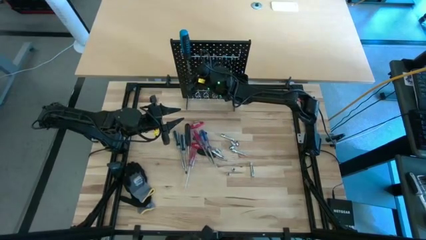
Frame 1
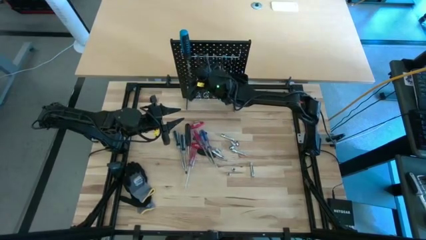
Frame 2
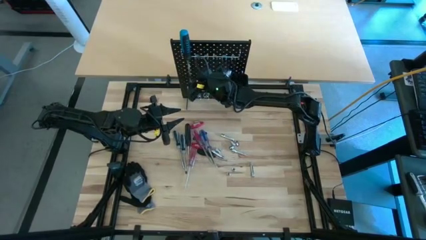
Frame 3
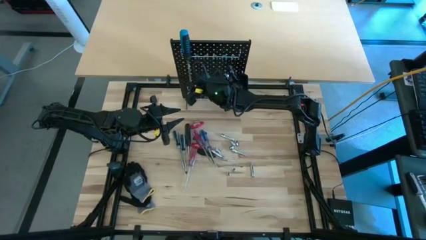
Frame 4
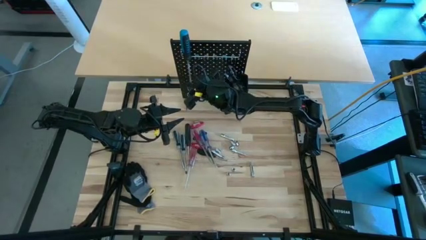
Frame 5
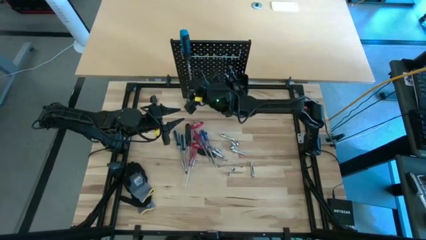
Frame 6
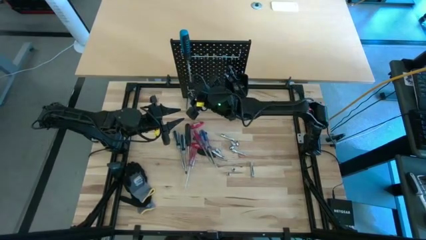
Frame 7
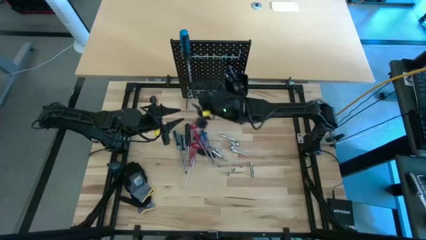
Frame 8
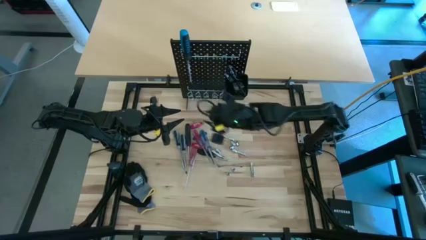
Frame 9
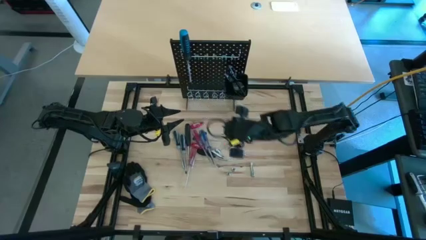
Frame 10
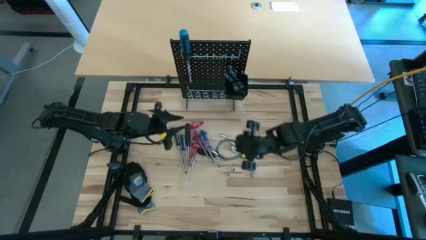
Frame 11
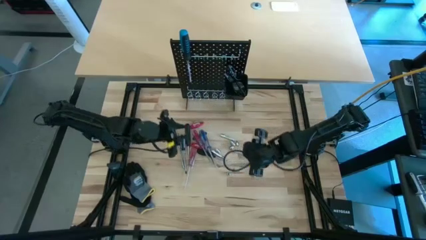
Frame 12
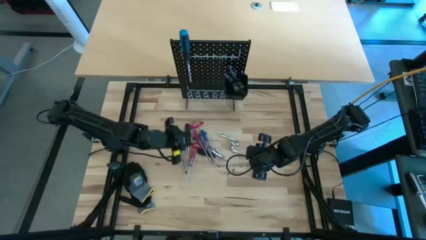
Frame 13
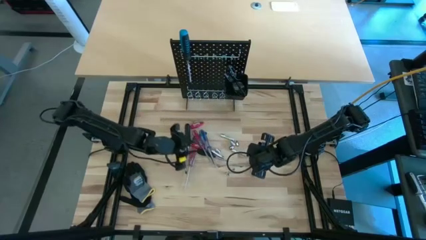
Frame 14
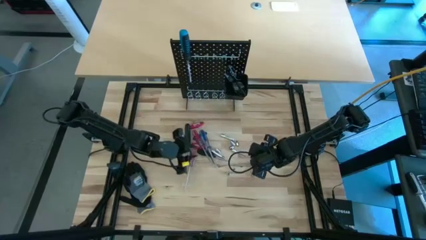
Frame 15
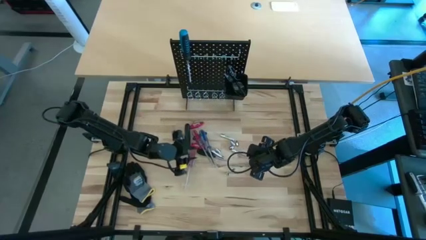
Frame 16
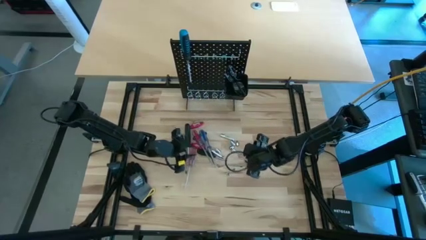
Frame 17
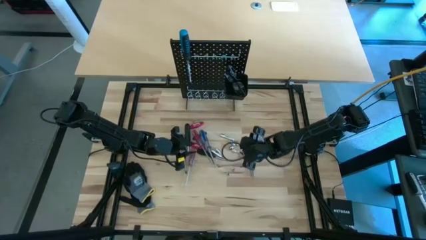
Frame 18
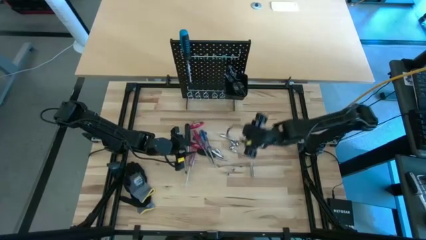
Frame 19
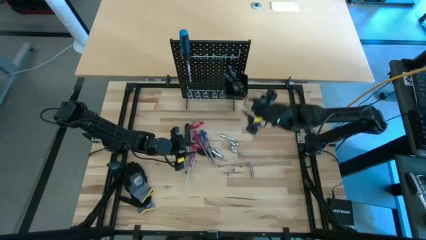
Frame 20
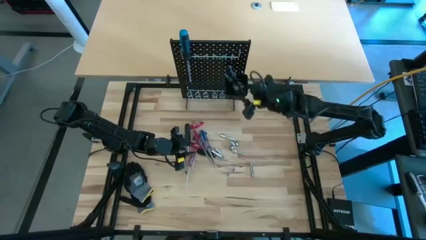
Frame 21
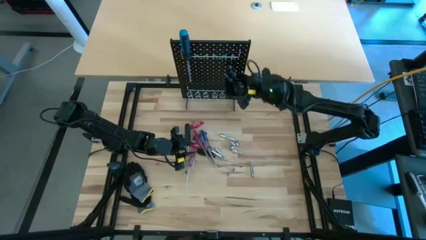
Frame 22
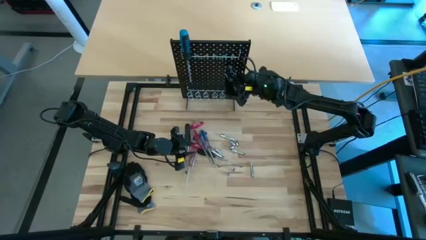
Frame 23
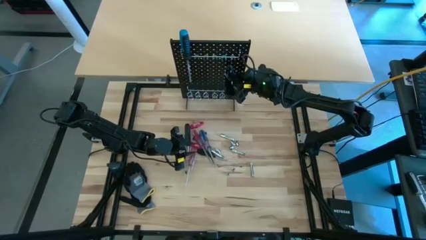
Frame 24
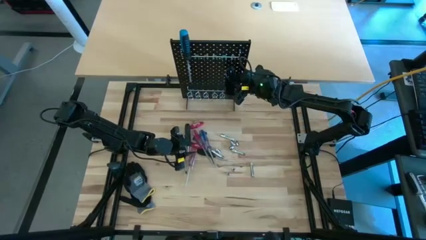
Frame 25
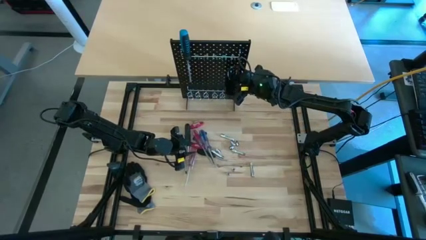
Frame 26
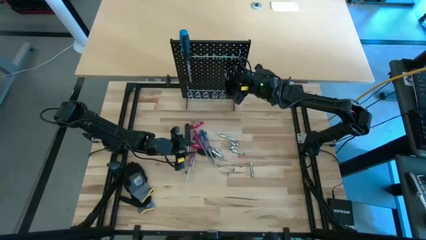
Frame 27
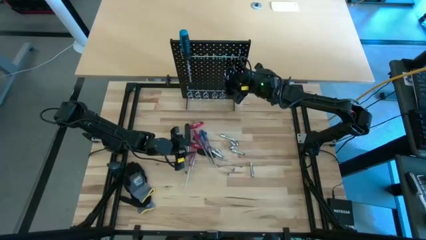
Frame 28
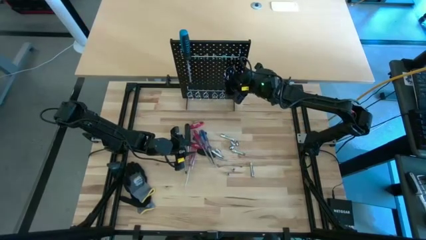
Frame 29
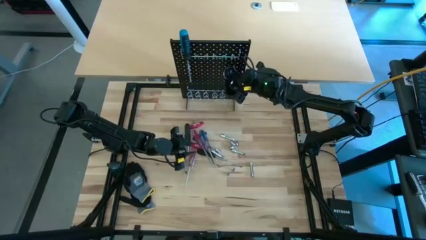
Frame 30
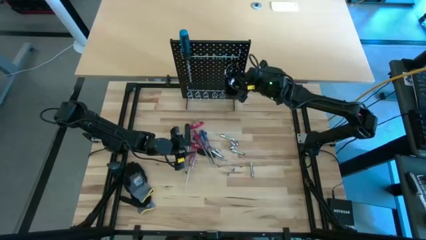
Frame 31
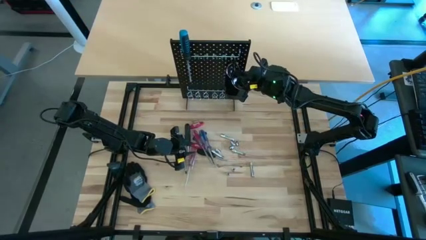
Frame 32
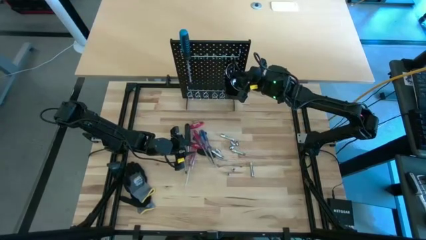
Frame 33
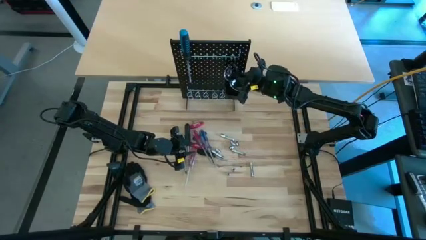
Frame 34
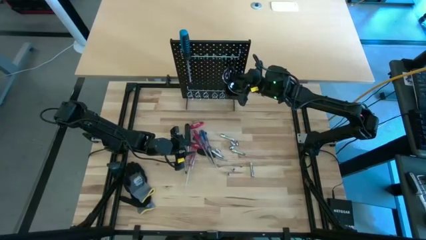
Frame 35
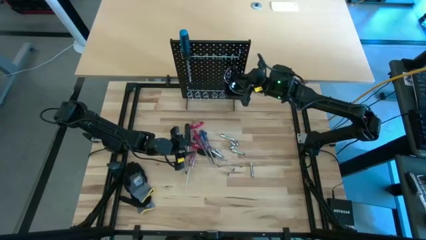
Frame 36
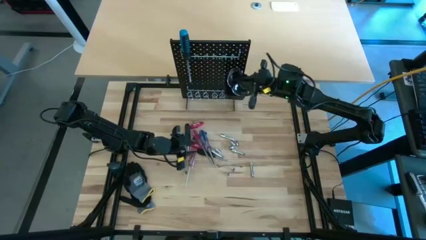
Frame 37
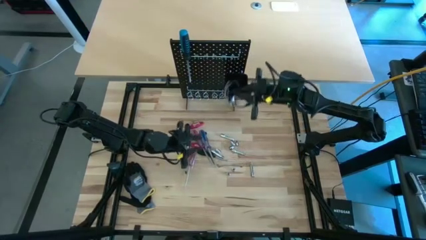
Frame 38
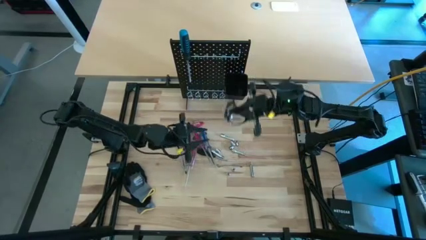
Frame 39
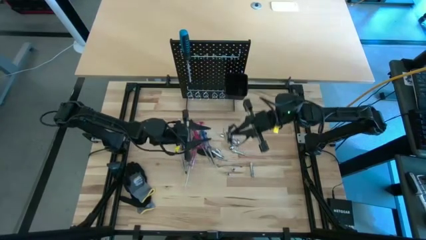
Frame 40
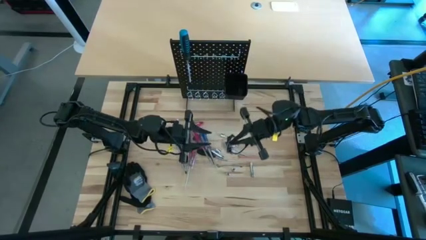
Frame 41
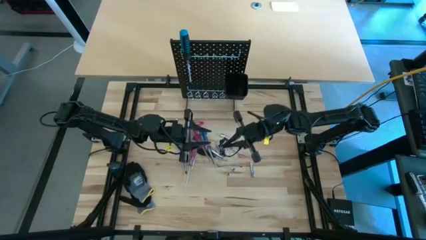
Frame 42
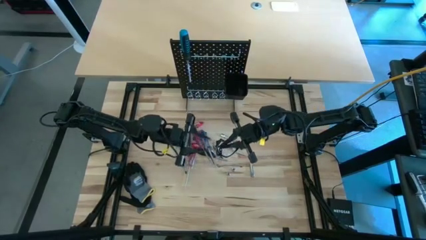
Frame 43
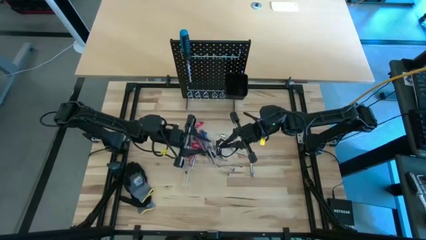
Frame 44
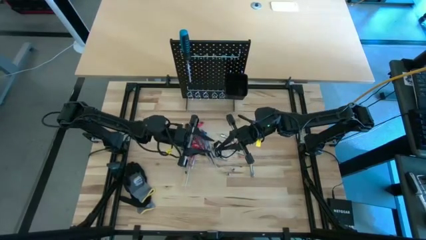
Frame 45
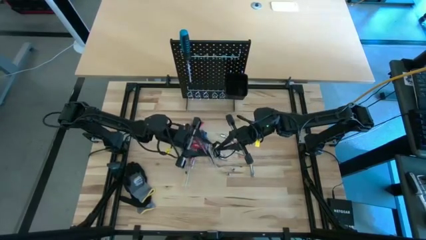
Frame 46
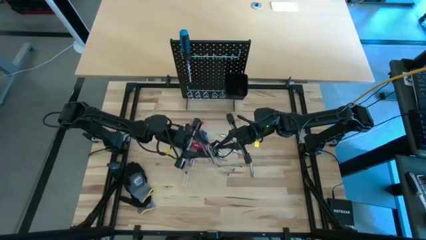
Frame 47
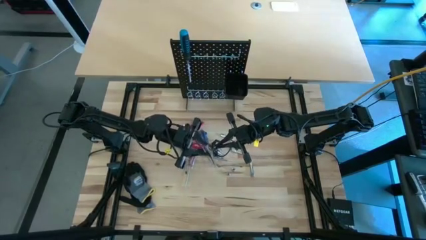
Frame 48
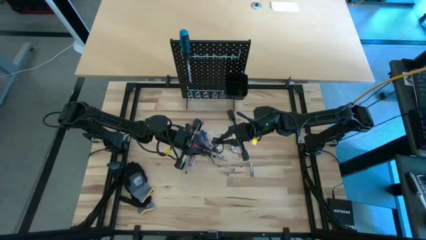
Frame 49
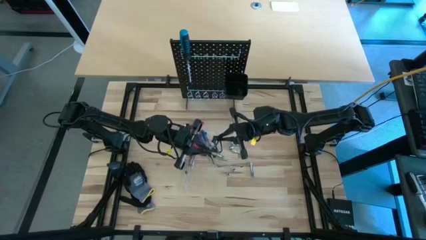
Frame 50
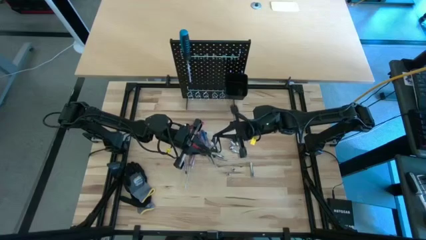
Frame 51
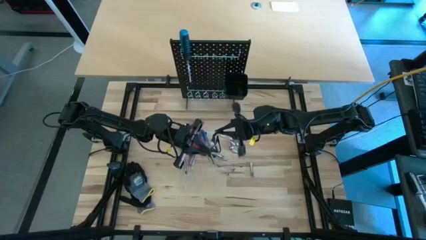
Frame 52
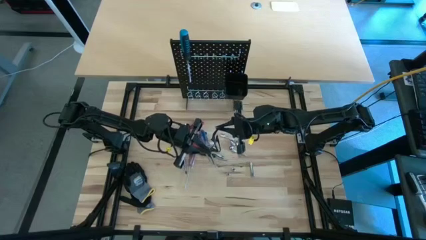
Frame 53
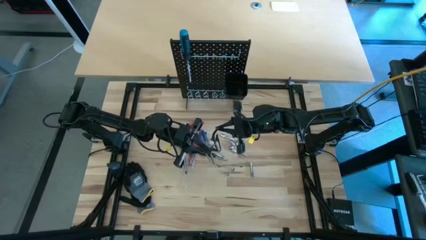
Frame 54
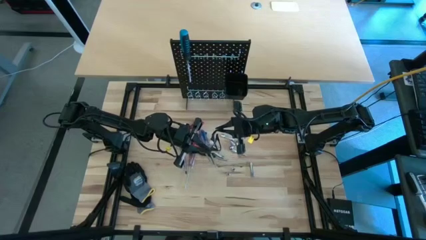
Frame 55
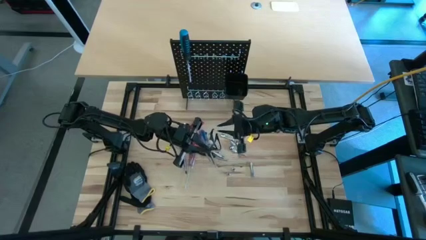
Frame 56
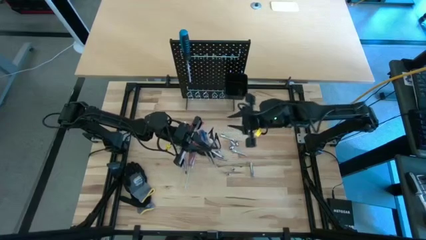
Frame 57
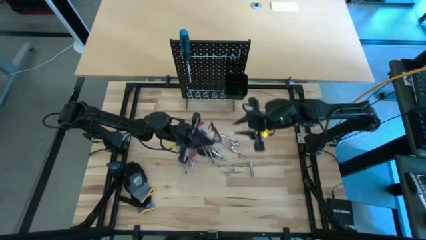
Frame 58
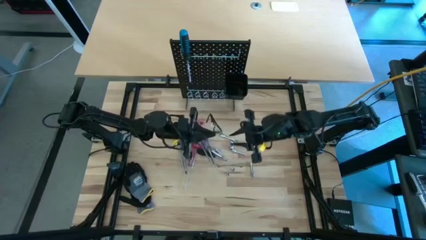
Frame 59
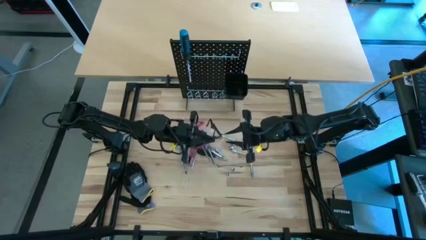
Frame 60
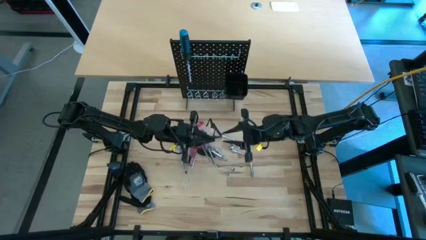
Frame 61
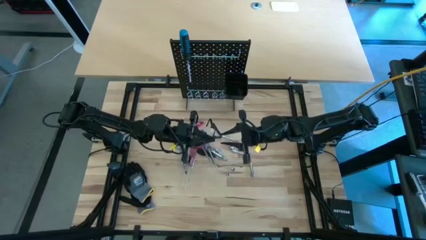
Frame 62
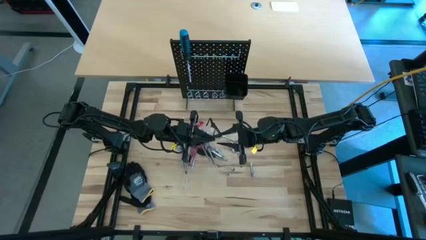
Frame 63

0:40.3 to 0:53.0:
Task: Hang tools onto peg board
Hang the black safety goggles on the peg board
